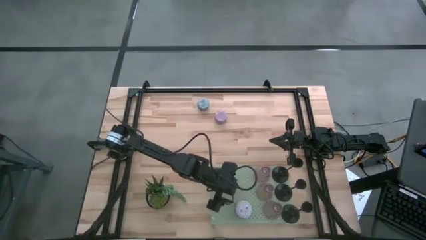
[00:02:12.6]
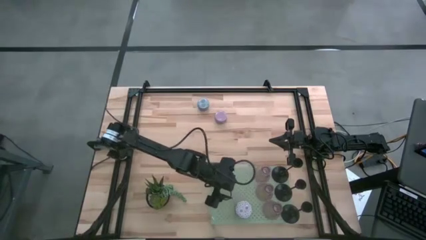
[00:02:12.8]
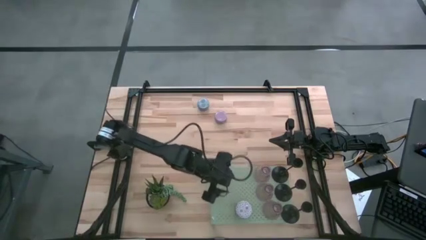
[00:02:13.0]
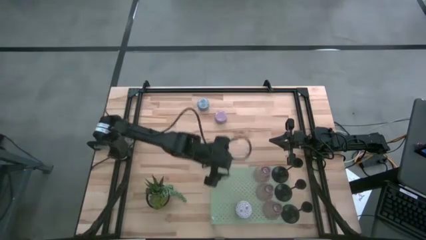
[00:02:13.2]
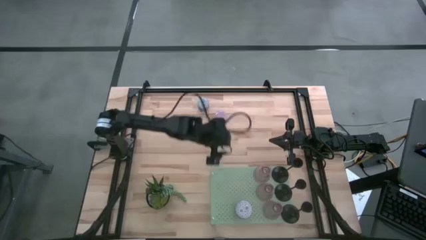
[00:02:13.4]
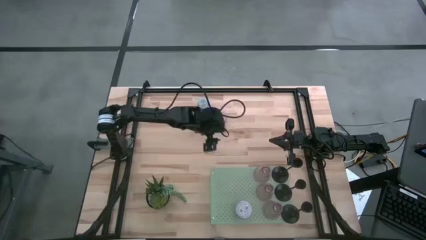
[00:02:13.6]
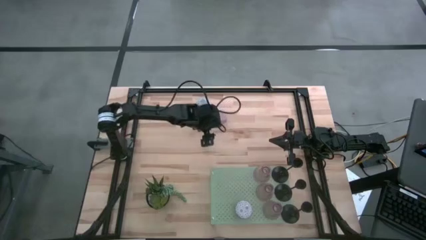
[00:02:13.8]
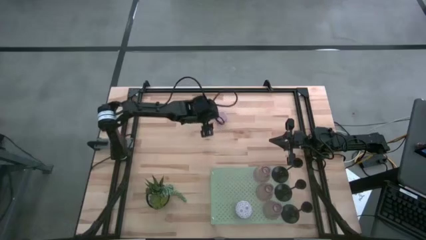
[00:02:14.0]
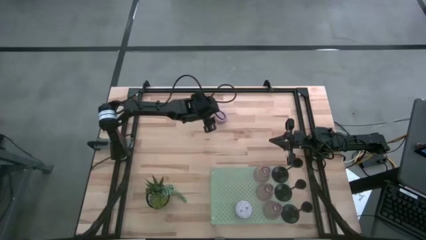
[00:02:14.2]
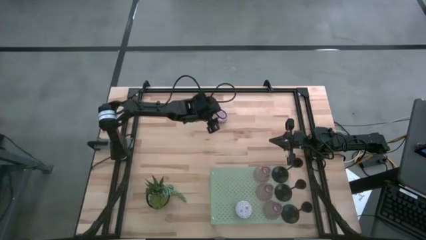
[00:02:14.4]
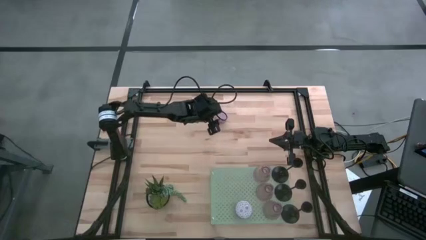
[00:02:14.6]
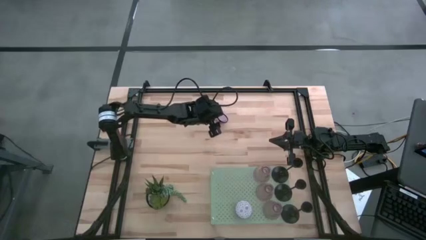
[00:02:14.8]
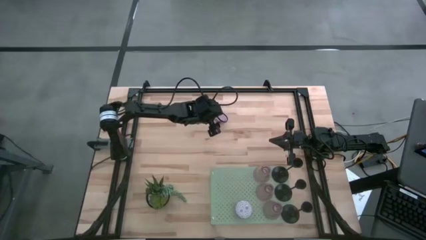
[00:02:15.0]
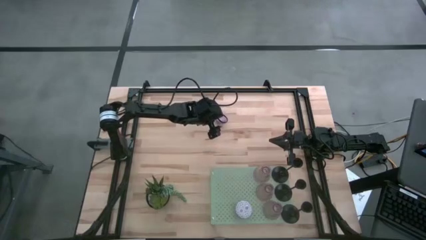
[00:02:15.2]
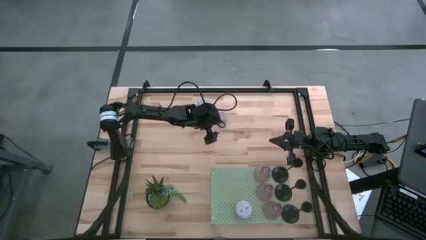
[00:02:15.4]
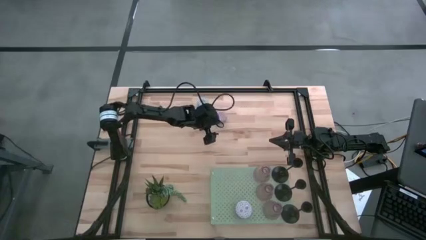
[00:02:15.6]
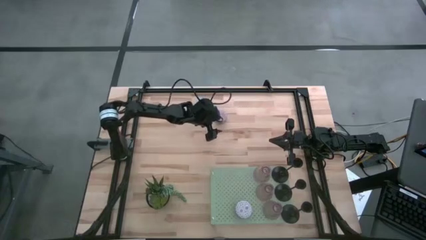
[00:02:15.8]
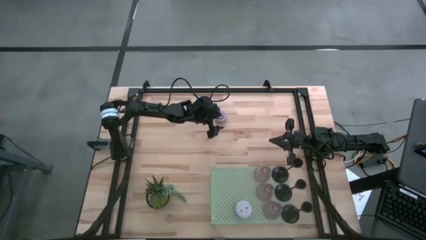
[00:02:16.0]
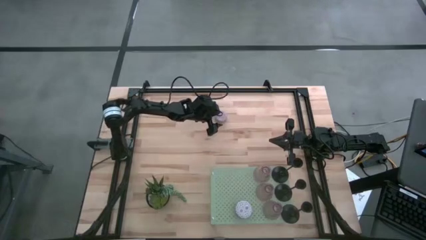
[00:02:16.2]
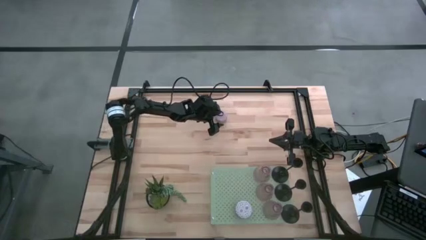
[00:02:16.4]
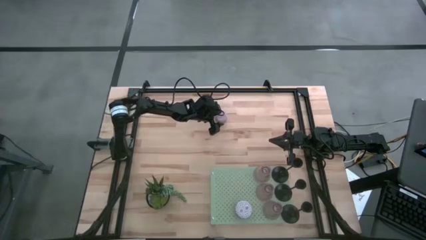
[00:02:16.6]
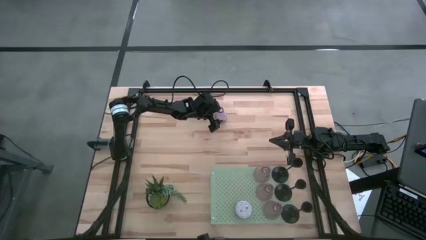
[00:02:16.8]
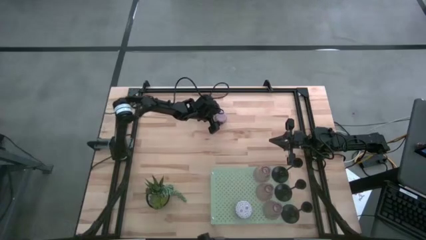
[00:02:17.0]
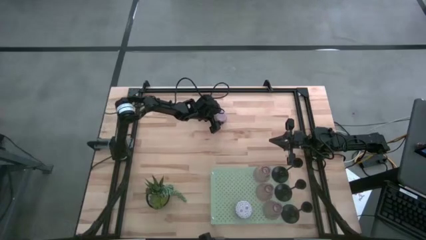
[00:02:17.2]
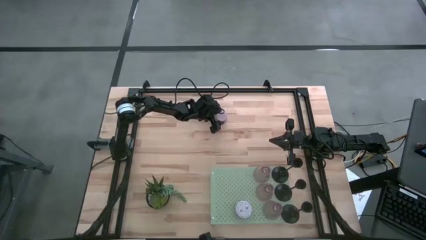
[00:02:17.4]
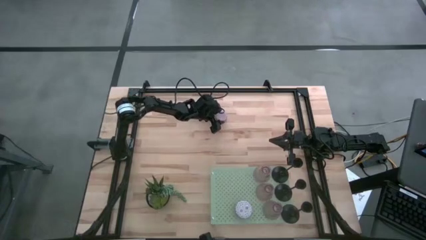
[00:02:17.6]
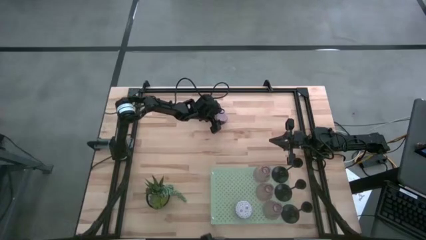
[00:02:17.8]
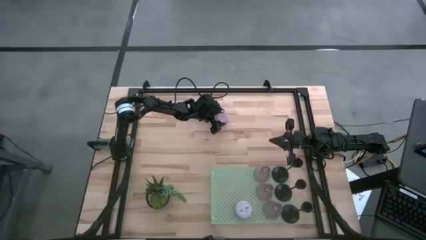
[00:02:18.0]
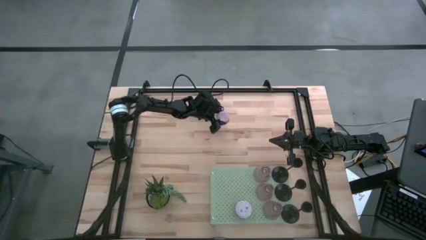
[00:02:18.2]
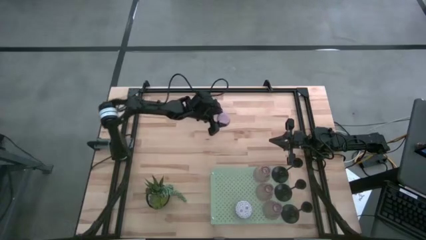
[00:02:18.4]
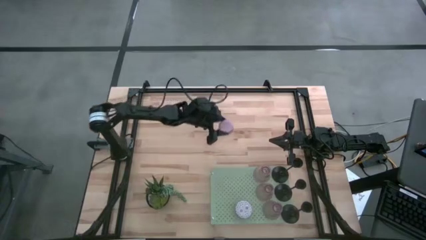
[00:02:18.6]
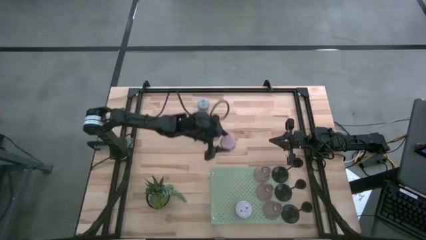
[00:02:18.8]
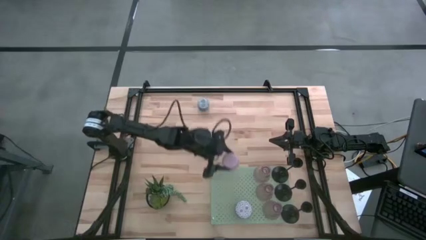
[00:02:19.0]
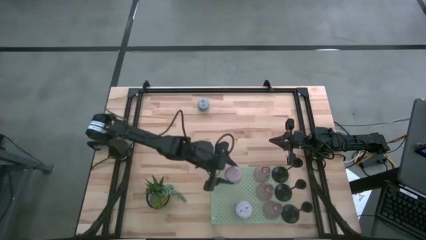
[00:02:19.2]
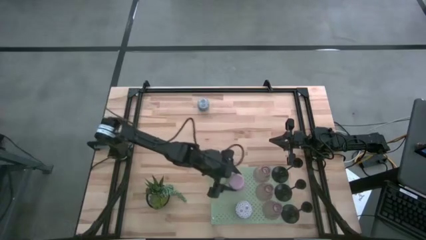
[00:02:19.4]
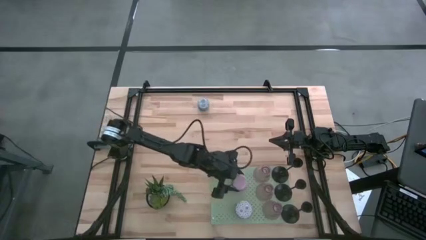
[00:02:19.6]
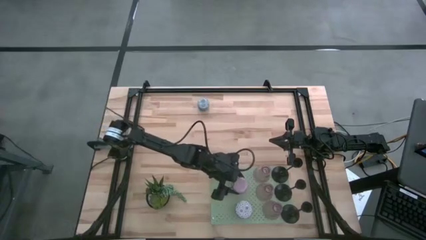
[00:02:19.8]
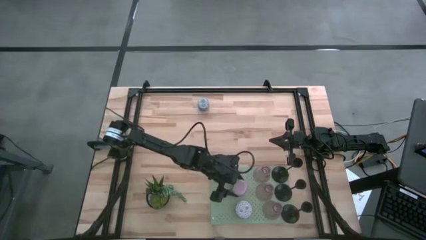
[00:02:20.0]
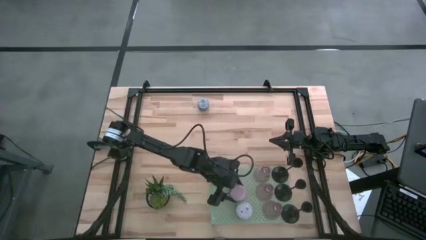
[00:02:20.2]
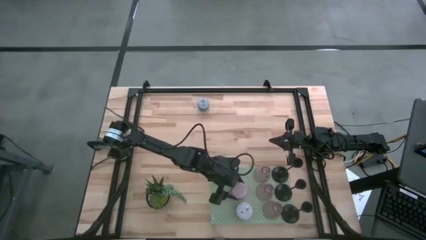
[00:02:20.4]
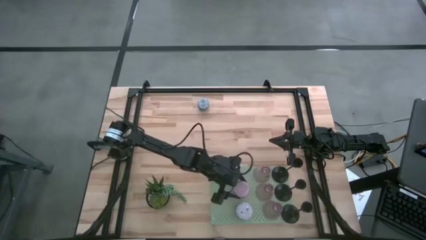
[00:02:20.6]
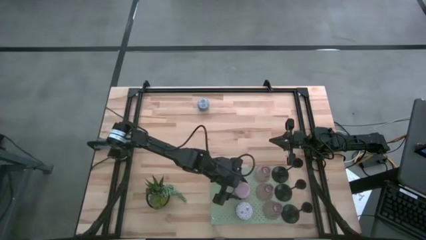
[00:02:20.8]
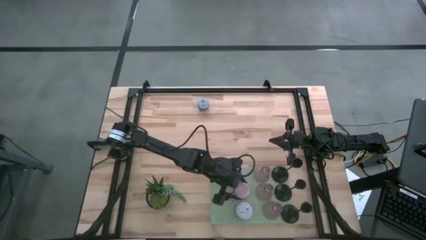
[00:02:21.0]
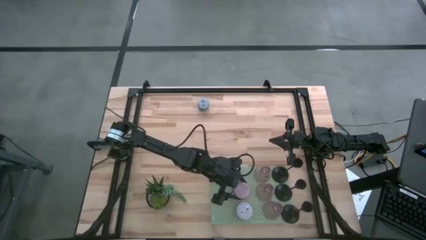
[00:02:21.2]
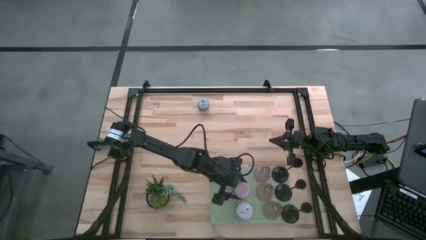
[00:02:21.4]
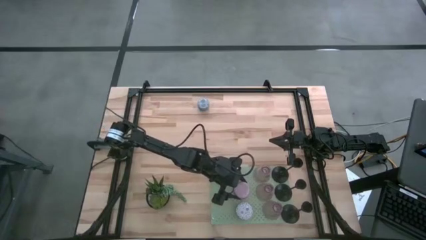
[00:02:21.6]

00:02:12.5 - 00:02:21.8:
Task: Pick & Place candle stick holders
Put the pink patterned scented candle on the shelf aligned with the other pink patterned scented candle

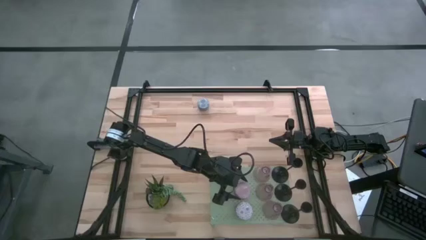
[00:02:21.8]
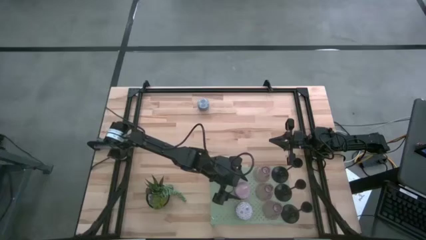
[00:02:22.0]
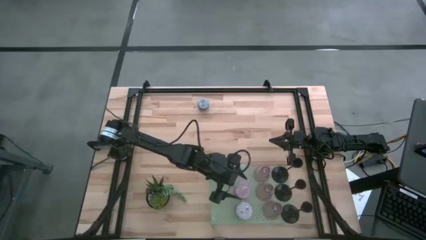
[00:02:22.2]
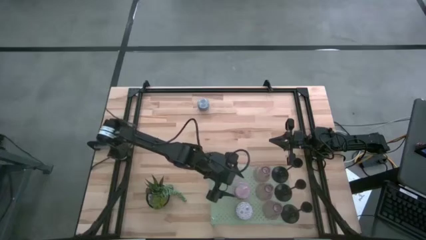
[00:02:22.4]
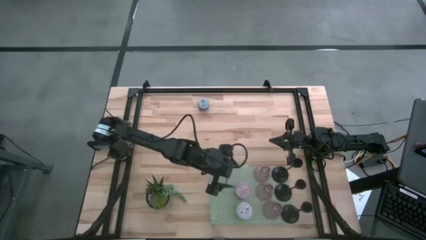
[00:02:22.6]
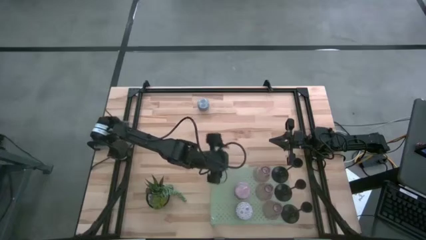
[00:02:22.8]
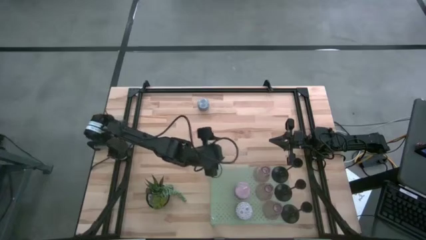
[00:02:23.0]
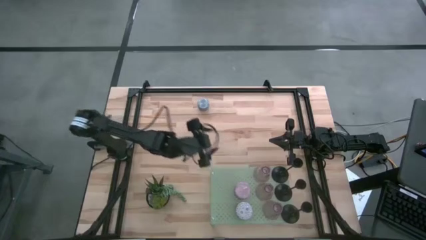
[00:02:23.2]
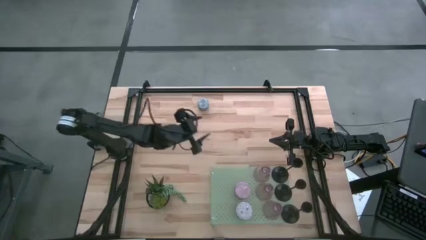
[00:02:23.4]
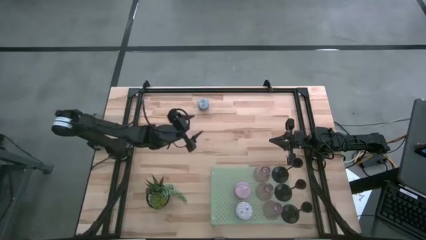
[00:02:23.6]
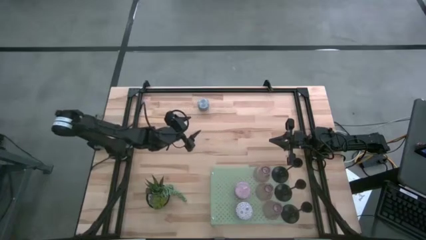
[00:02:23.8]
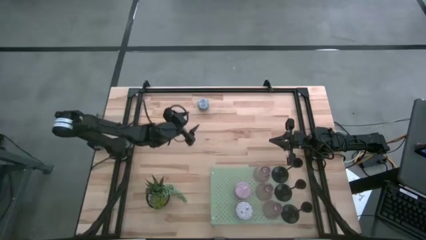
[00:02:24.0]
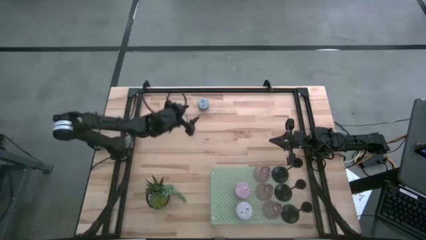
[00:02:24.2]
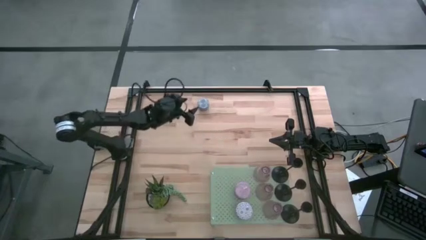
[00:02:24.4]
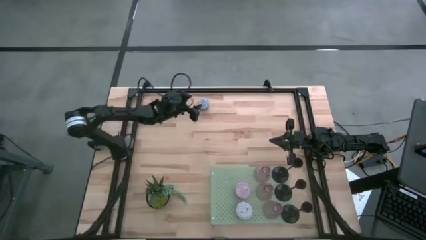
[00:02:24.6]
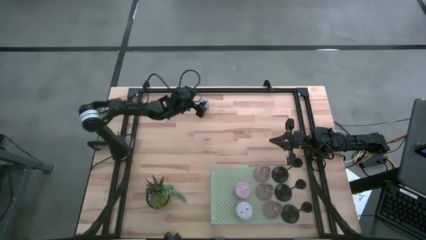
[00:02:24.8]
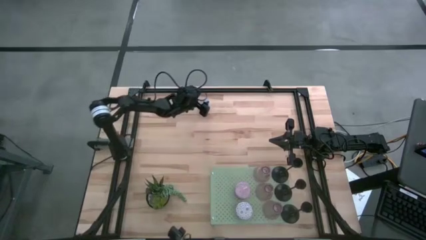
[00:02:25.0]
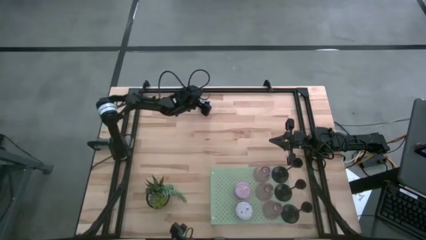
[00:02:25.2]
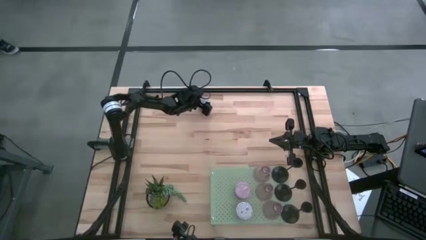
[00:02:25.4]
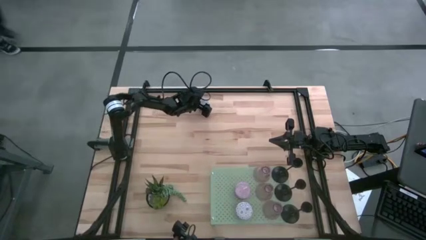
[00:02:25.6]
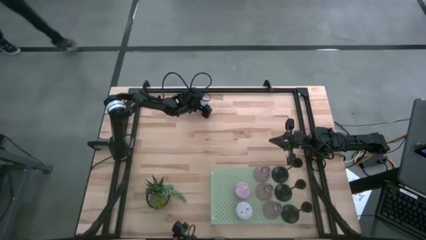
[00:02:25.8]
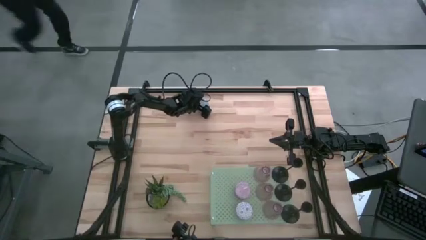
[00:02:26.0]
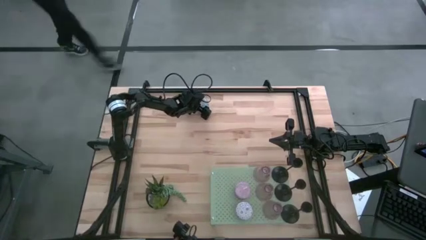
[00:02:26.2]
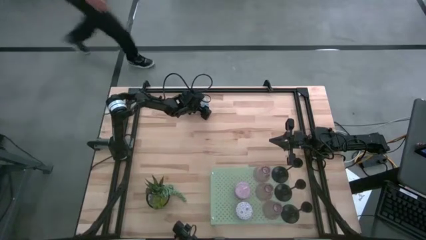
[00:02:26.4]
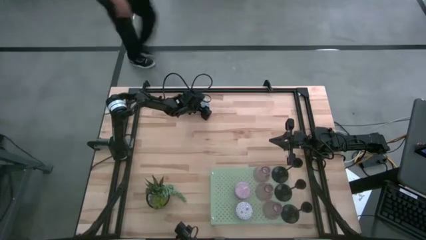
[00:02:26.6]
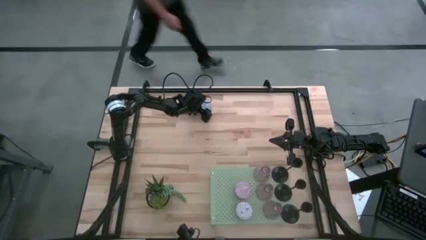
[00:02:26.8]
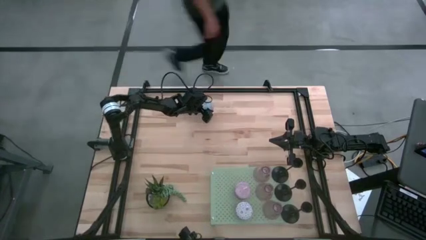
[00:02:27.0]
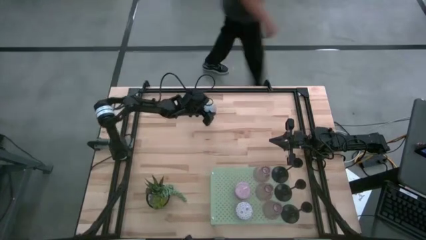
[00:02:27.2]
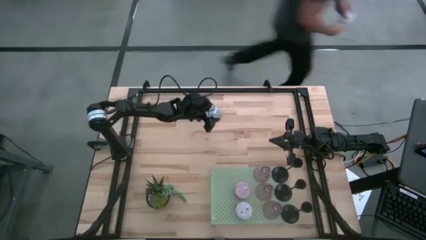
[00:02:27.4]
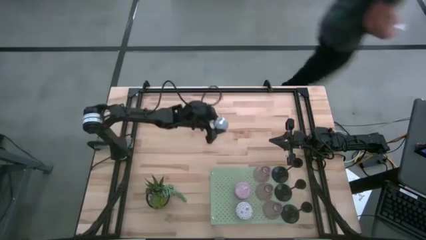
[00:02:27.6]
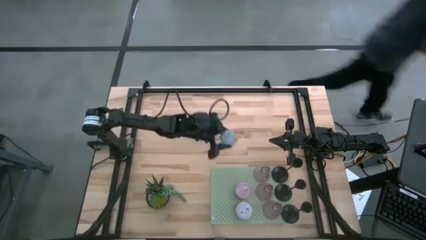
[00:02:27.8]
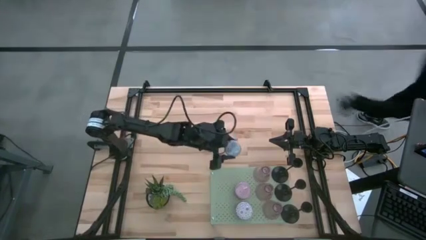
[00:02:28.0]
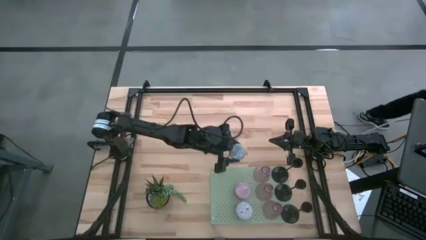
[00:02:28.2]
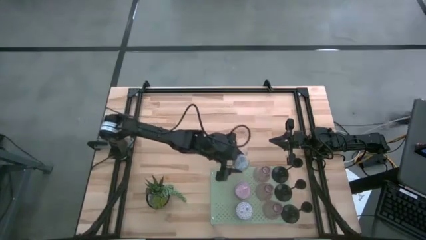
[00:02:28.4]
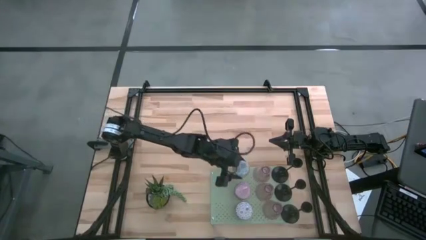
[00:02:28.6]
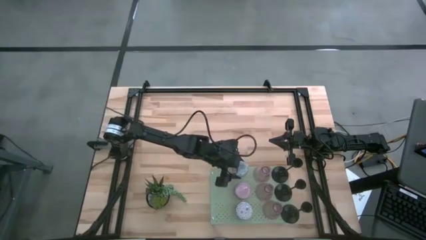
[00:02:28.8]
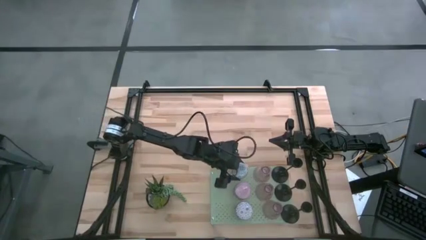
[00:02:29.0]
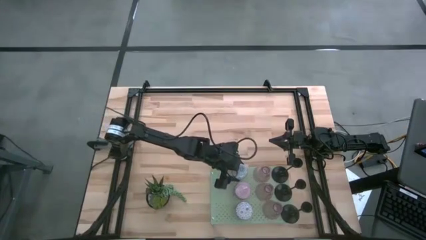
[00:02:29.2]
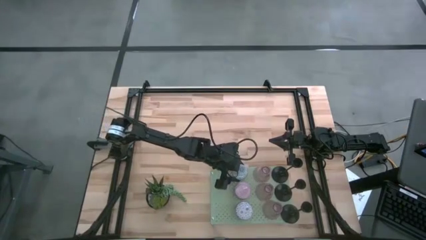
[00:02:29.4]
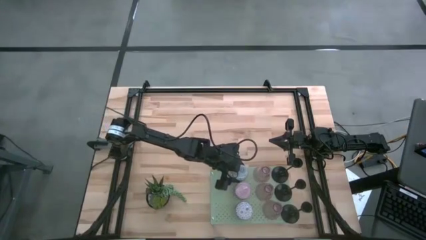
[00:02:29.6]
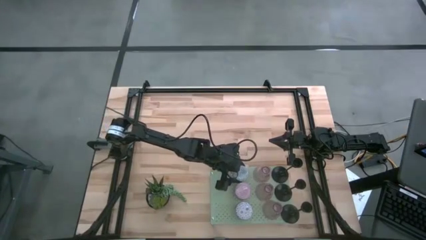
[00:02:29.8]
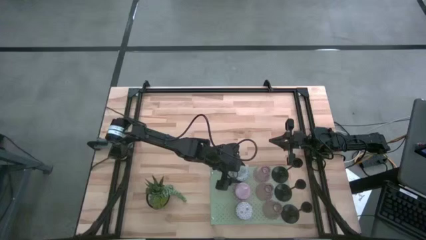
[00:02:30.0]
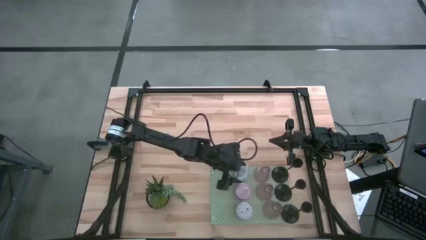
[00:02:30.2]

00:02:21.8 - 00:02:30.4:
Put the blue patterned scented candle on the shelf aligned with the other blue patterned scented candle
